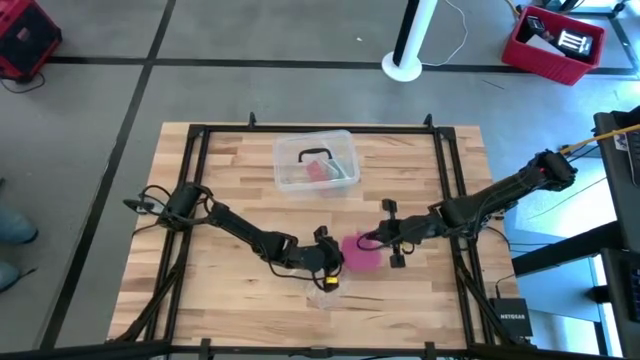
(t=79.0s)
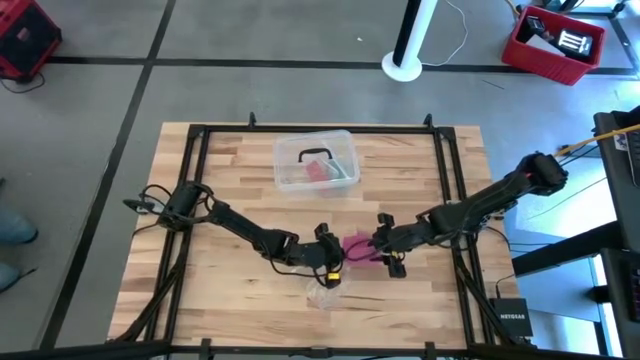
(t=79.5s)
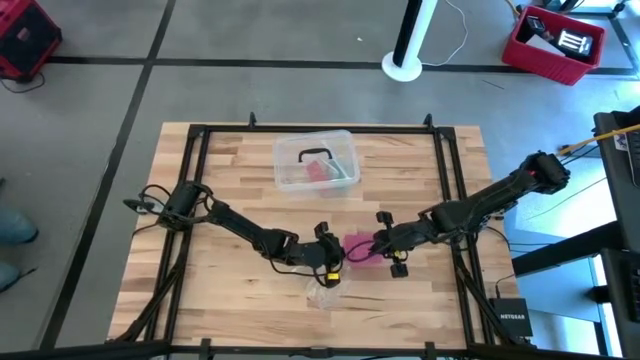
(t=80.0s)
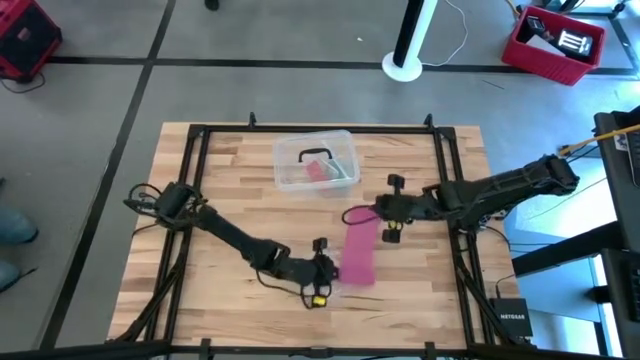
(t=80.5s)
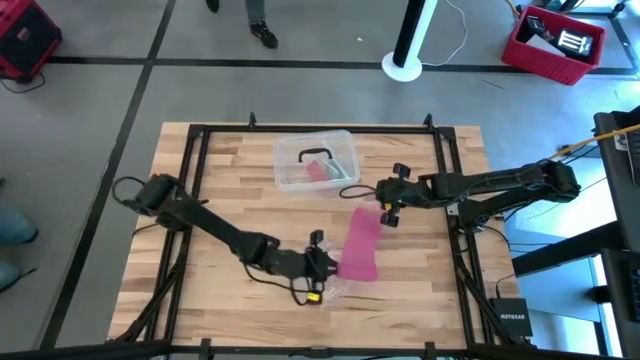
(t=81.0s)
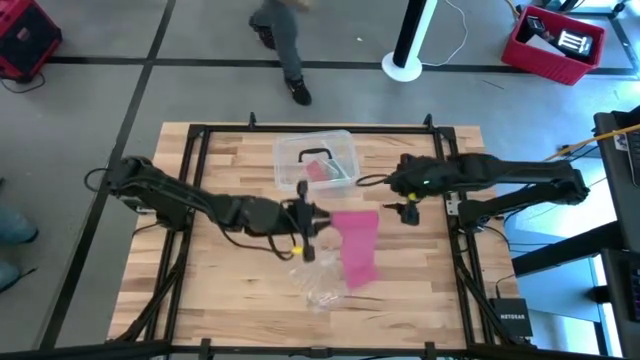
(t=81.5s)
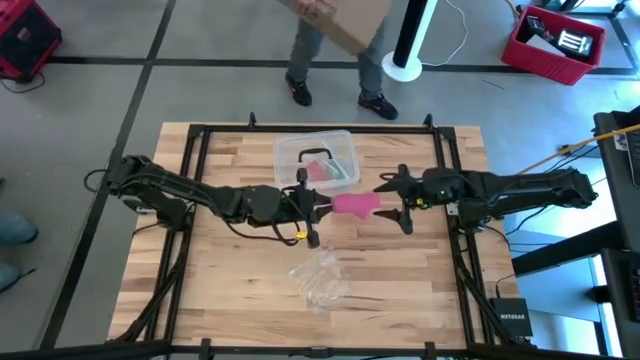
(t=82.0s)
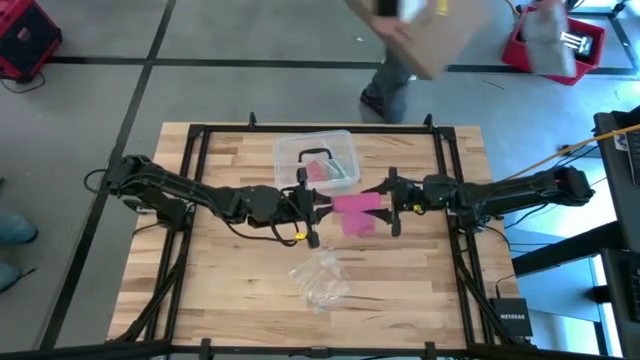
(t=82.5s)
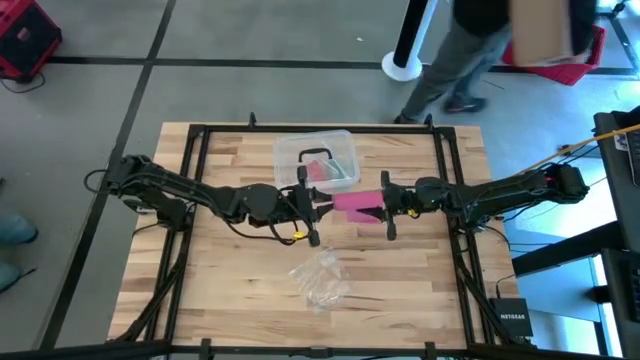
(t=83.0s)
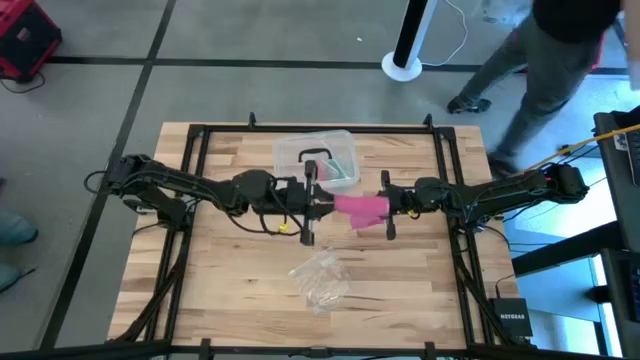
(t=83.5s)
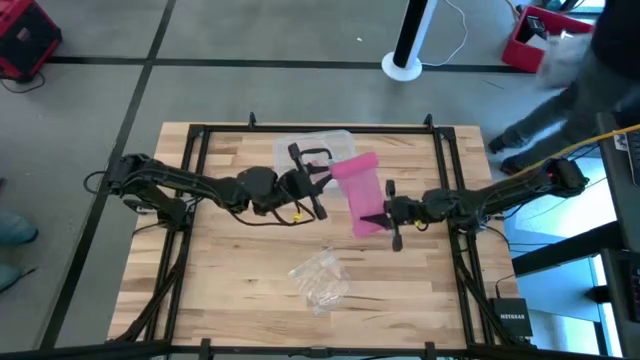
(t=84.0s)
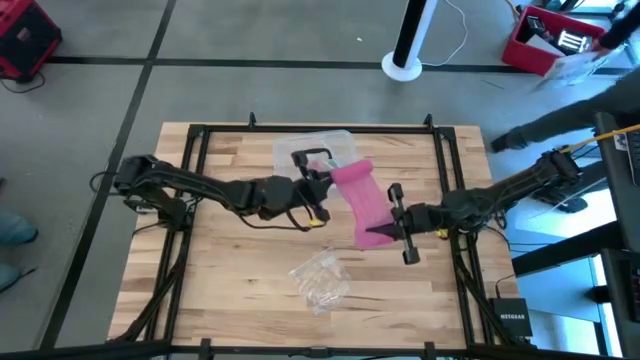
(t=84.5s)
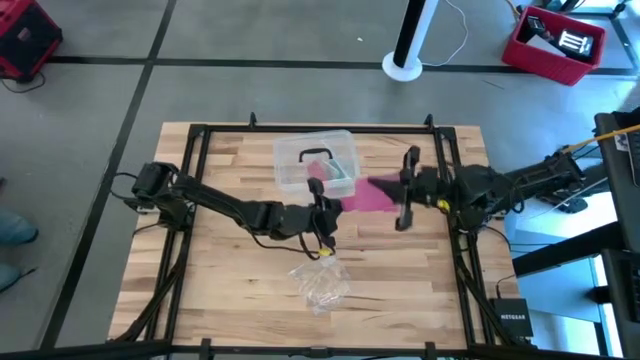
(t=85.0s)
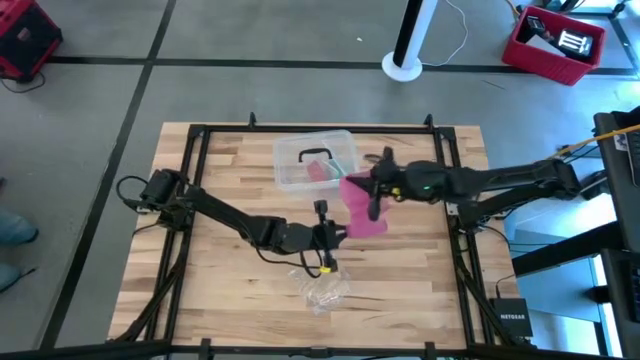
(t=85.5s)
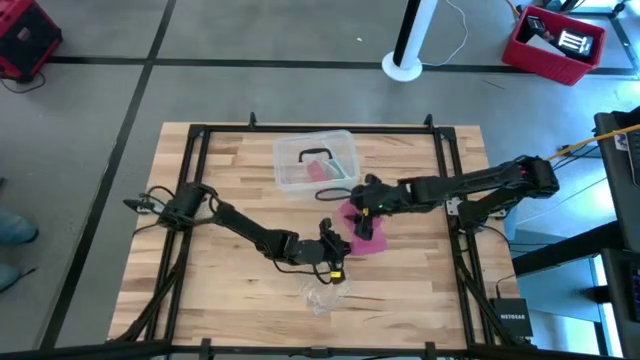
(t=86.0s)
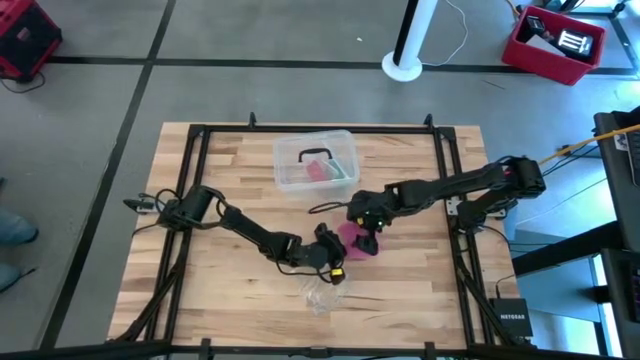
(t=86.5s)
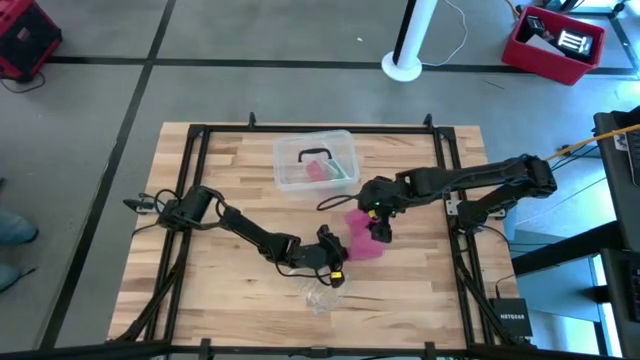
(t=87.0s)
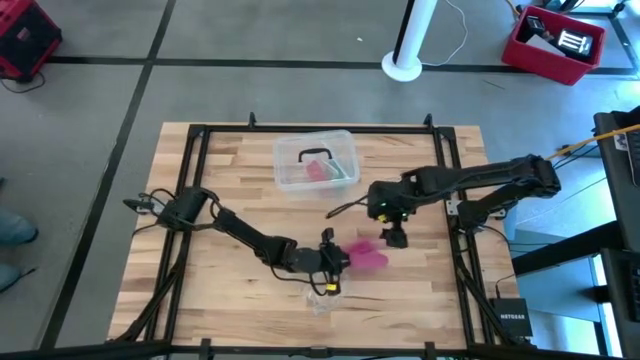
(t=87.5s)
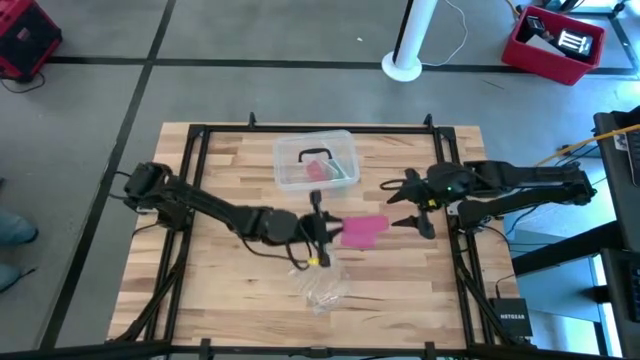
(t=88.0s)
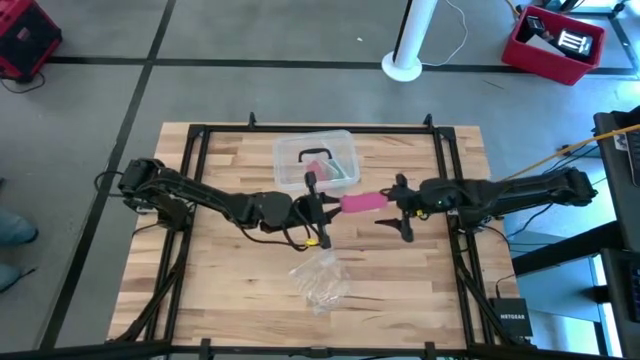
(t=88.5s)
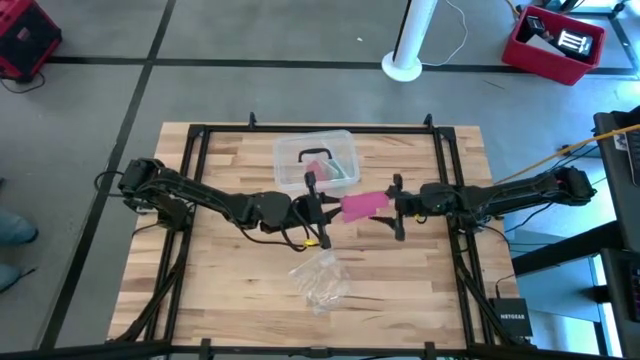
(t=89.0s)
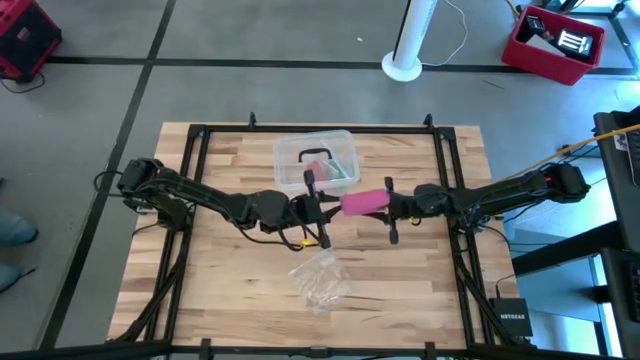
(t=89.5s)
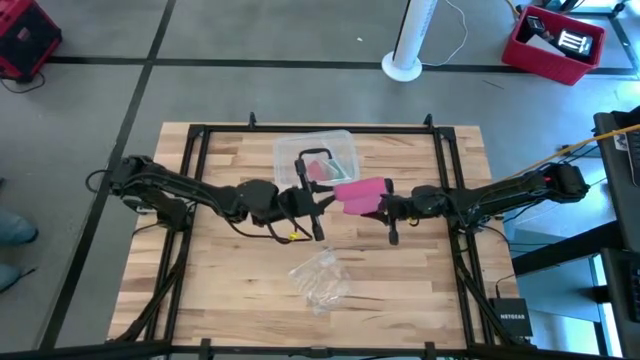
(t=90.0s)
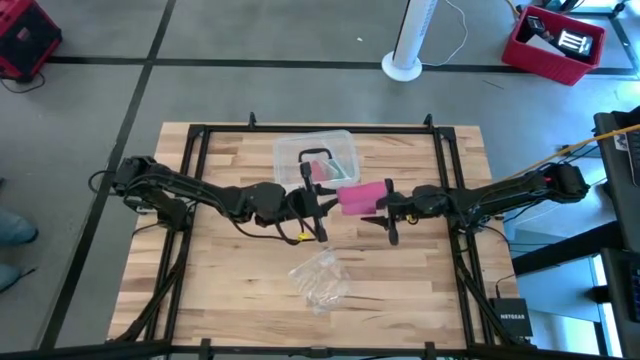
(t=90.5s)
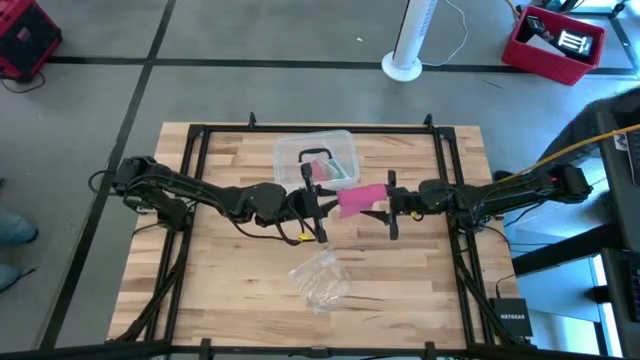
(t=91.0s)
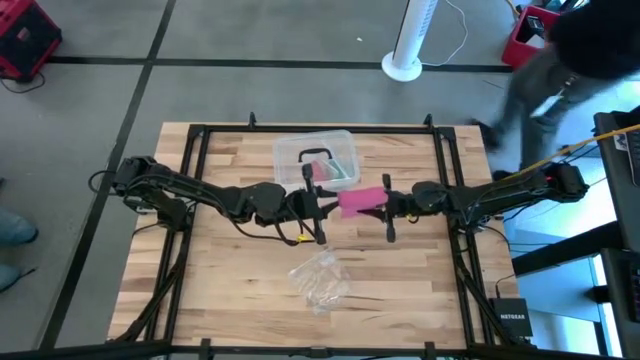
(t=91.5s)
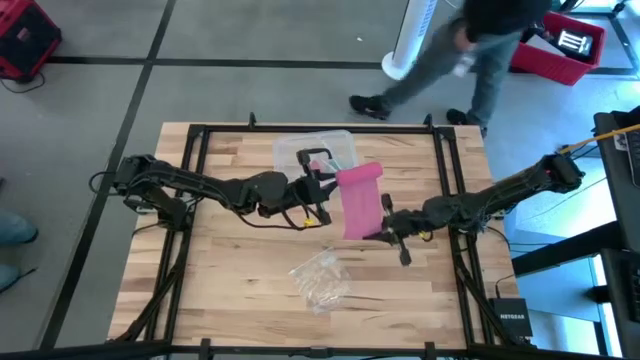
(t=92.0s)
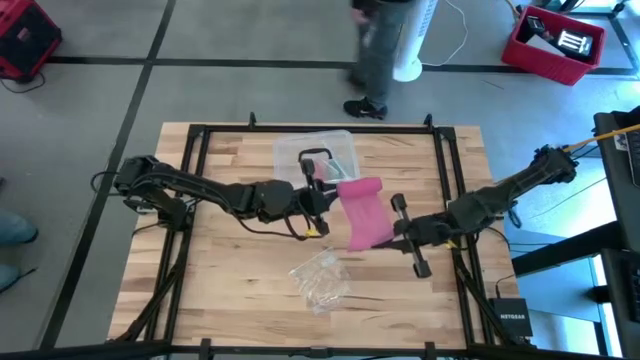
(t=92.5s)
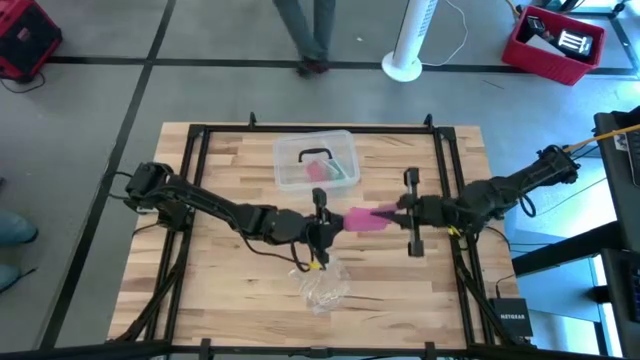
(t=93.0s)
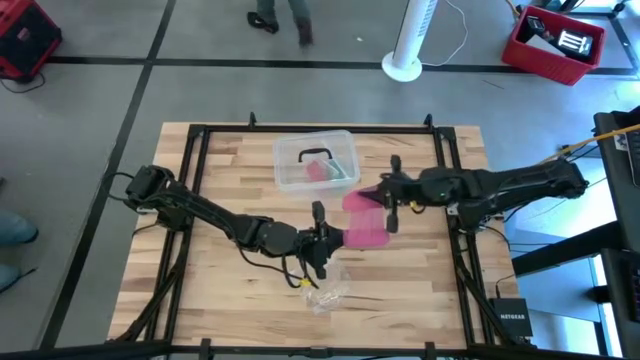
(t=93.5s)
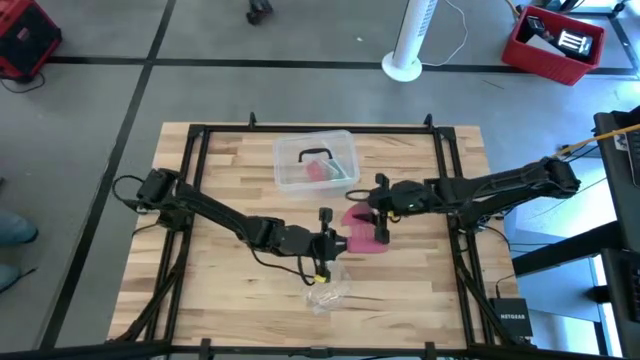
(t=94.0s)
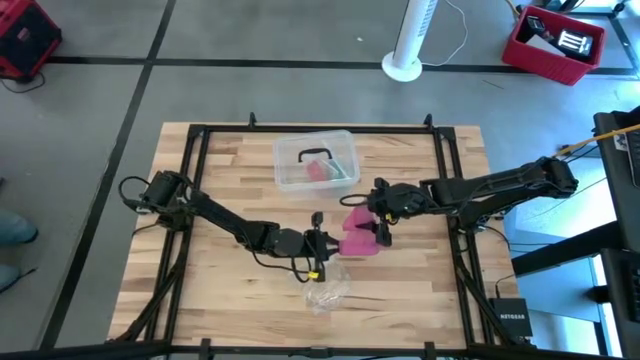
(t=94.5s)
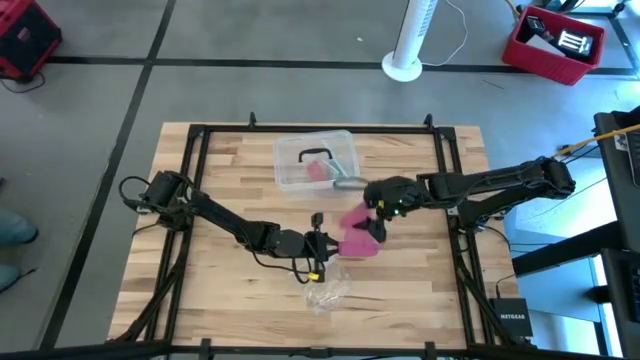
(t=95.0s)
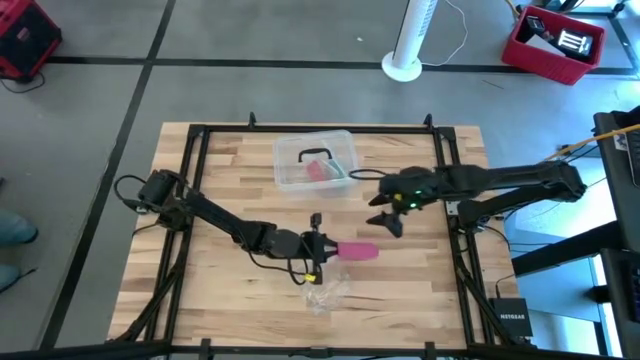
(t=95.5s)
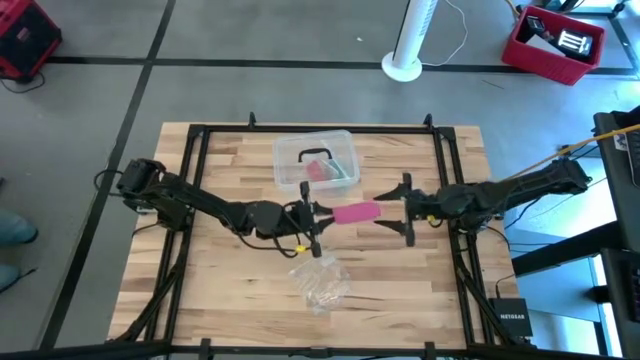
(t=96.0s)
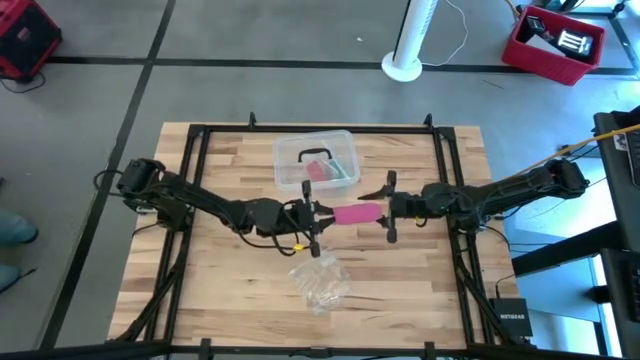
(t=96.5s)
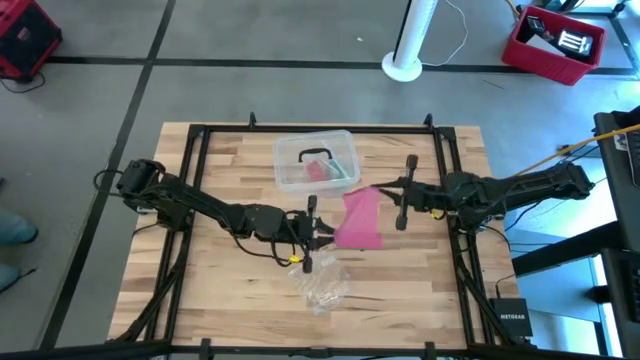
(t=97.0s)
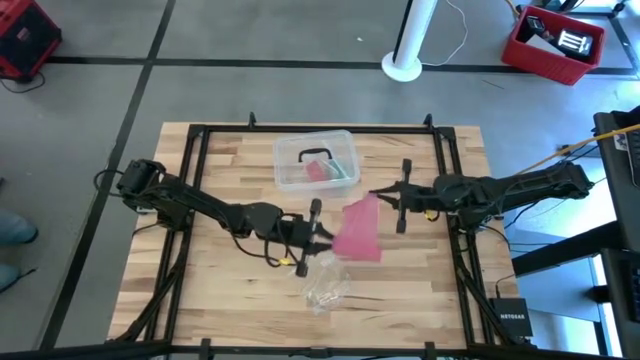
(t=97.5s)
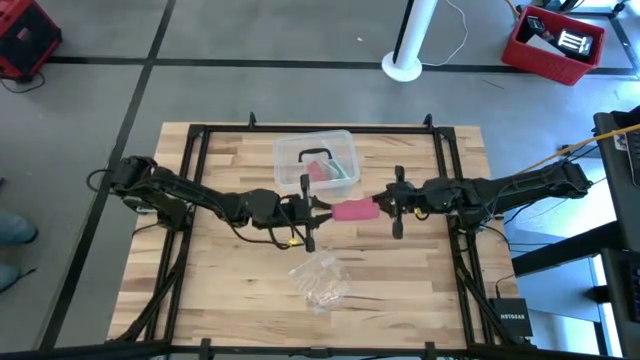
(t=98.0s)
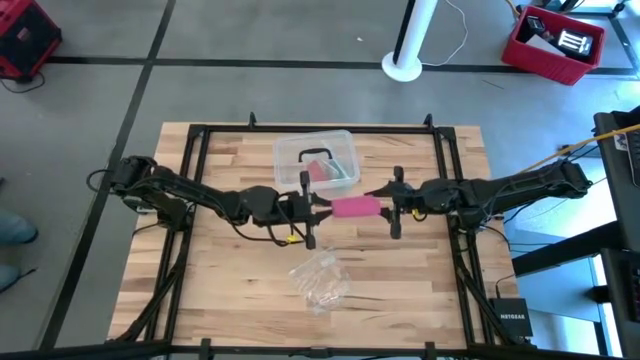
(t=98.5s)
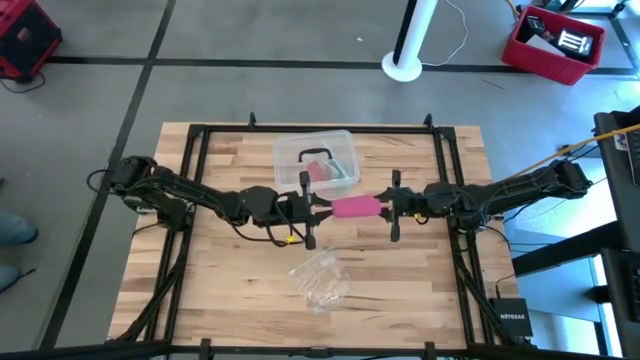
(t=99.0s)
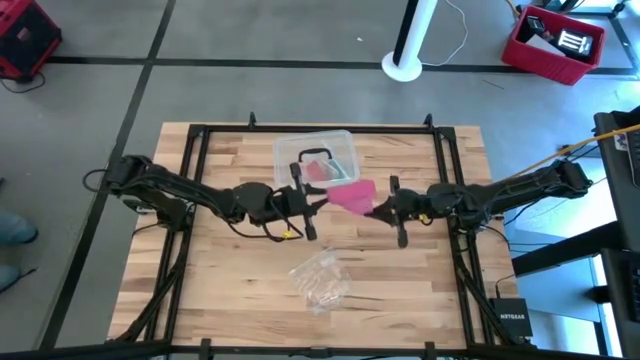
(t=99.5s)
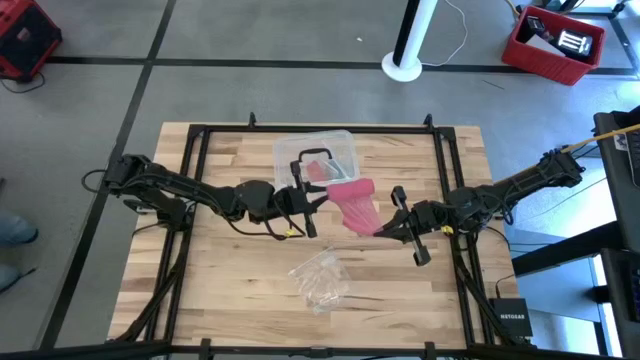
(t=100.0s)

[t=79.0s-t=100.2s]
Task: Roll bandage
Roll the pink bandage
